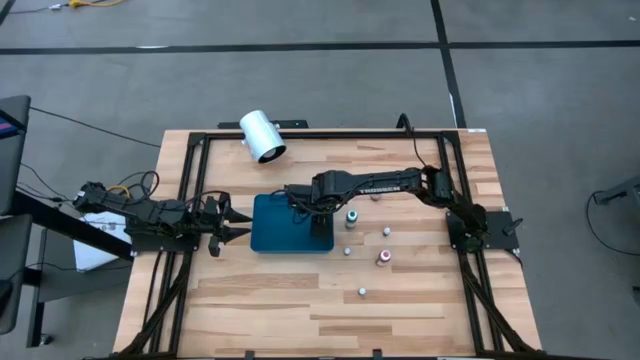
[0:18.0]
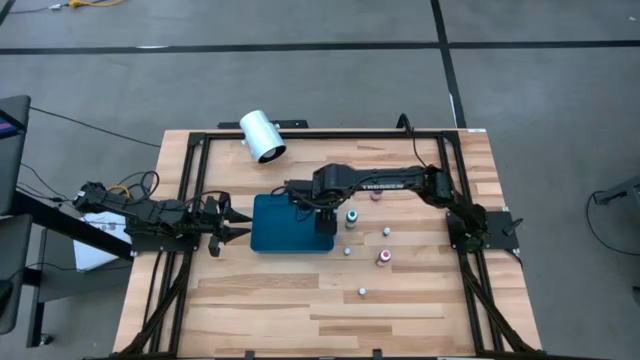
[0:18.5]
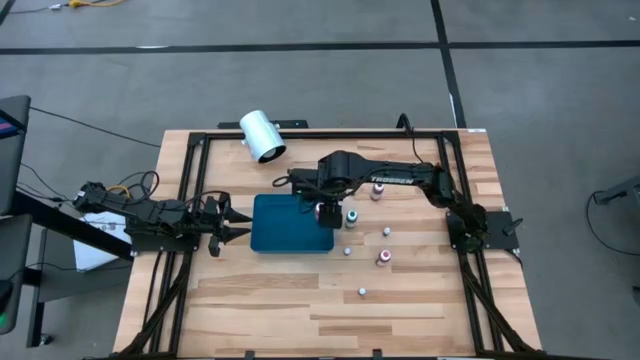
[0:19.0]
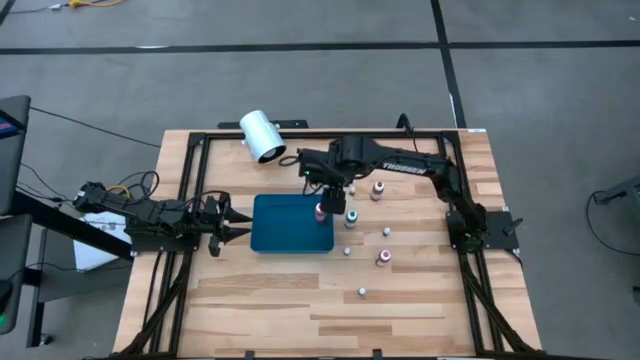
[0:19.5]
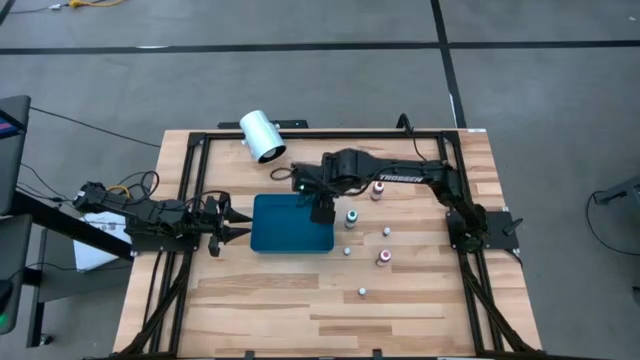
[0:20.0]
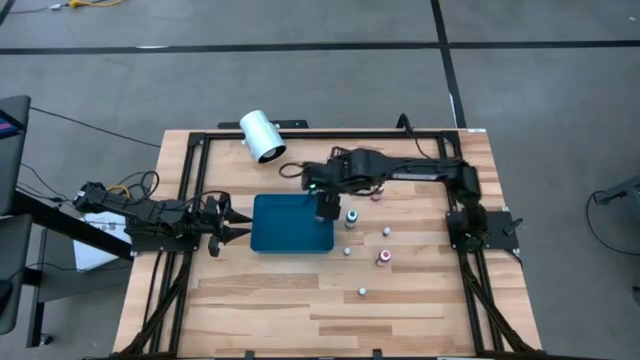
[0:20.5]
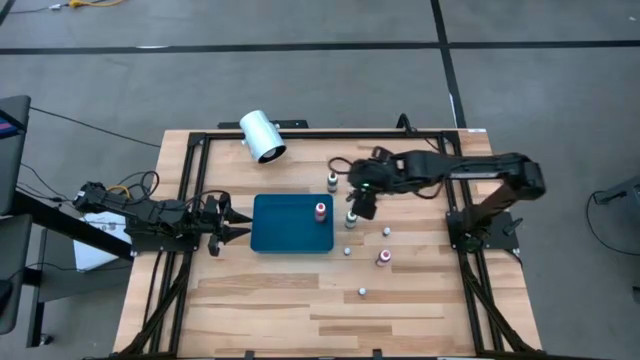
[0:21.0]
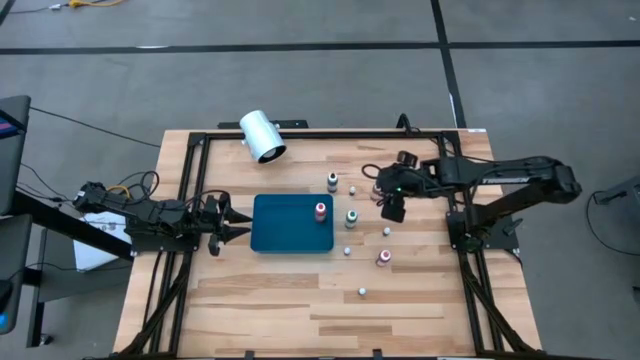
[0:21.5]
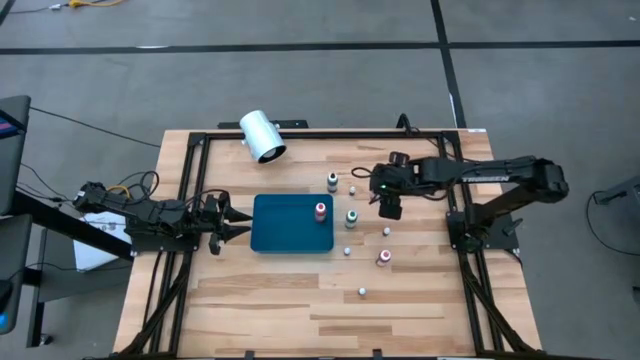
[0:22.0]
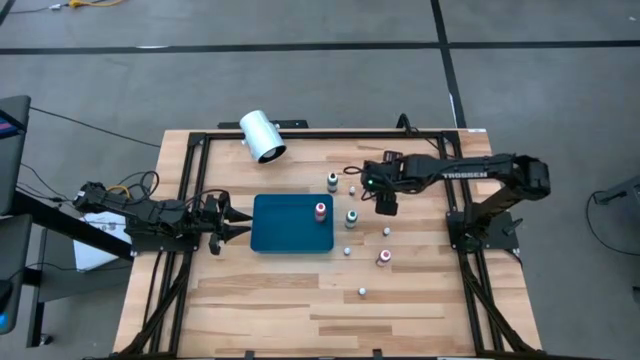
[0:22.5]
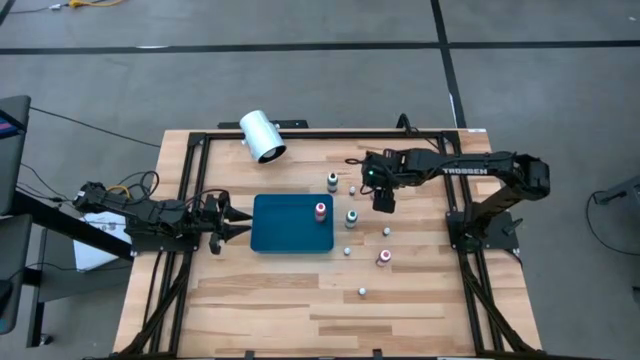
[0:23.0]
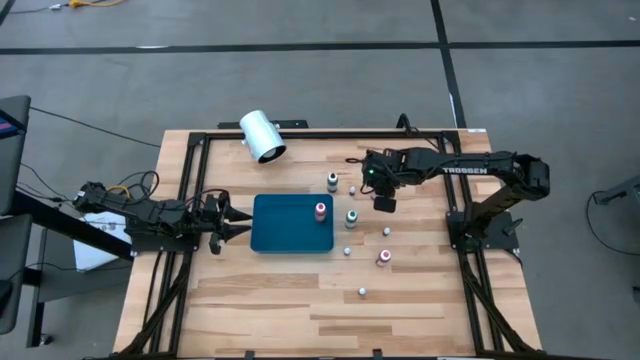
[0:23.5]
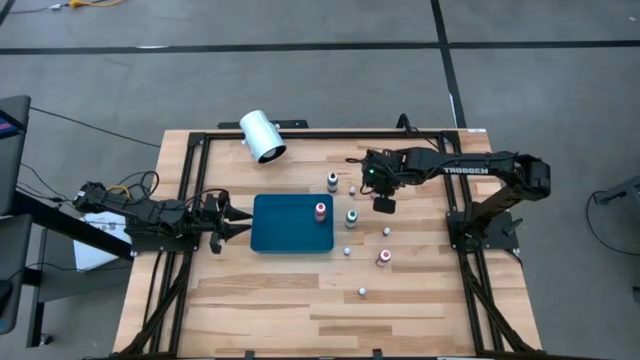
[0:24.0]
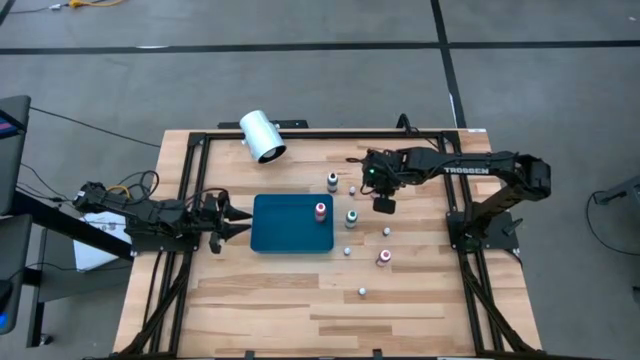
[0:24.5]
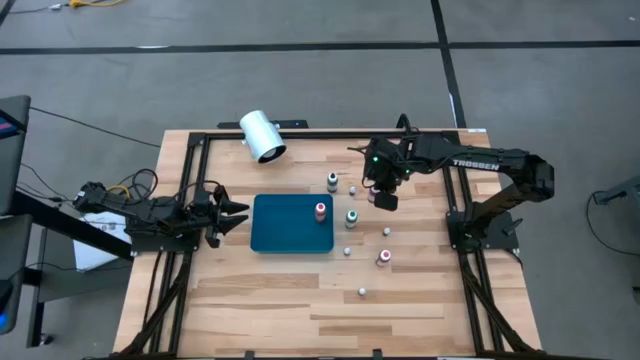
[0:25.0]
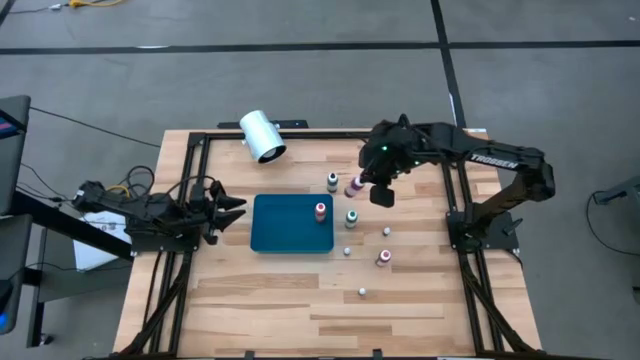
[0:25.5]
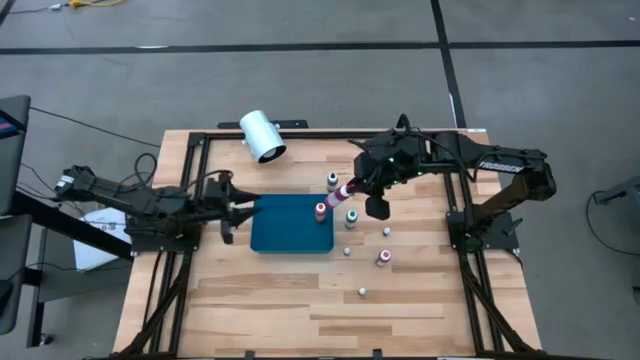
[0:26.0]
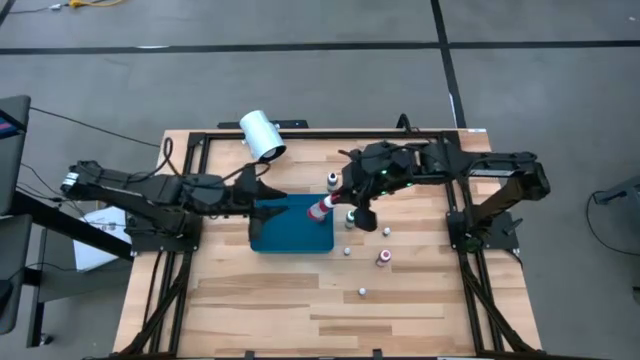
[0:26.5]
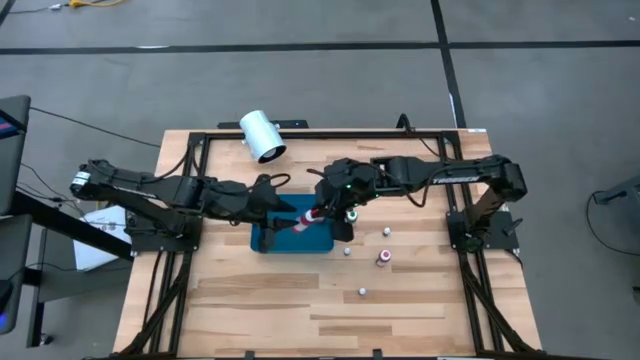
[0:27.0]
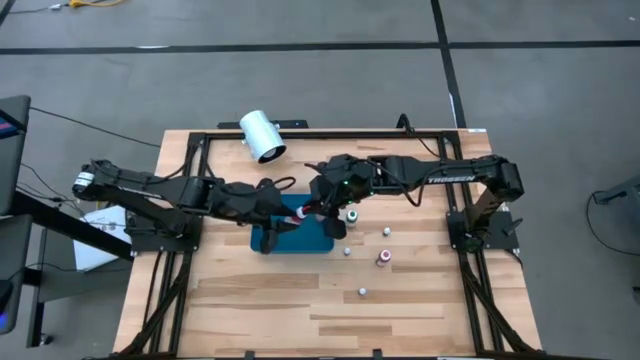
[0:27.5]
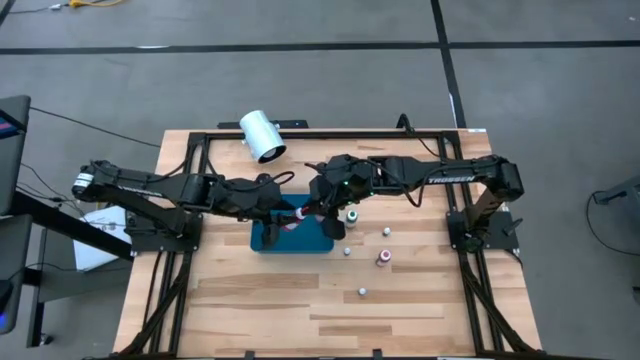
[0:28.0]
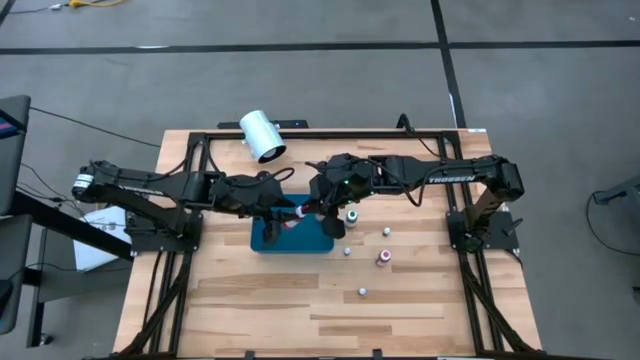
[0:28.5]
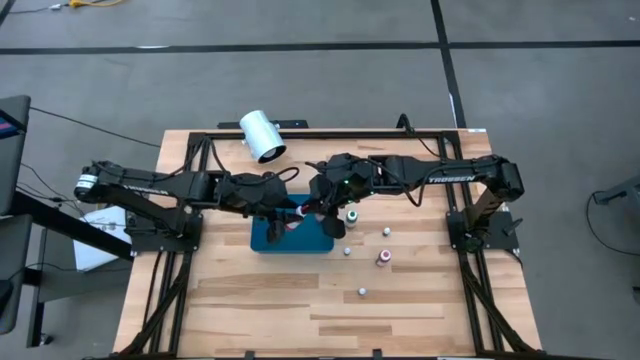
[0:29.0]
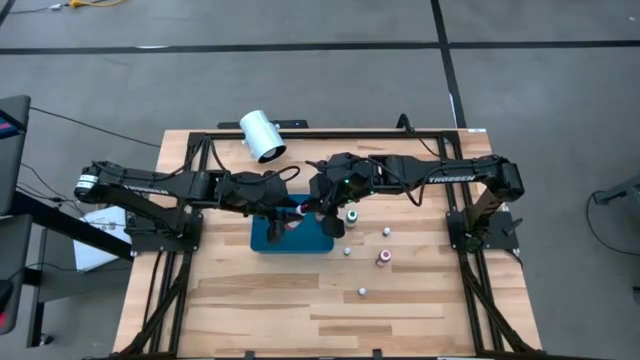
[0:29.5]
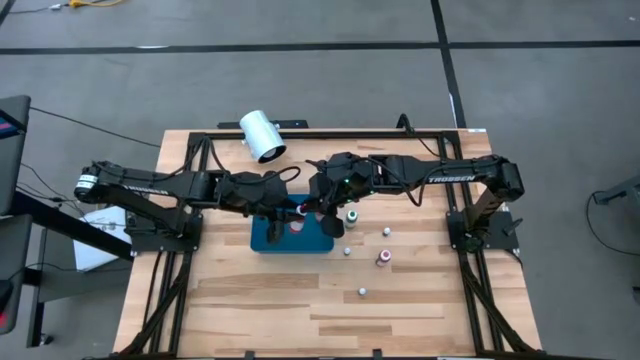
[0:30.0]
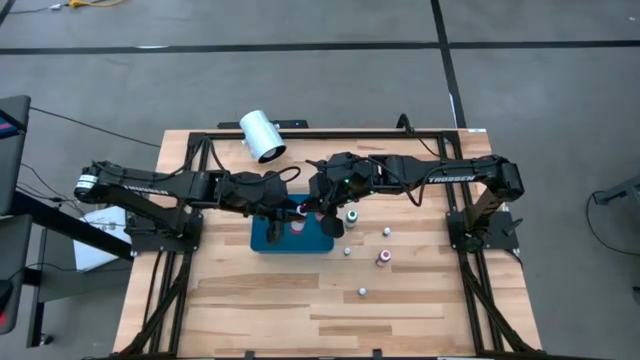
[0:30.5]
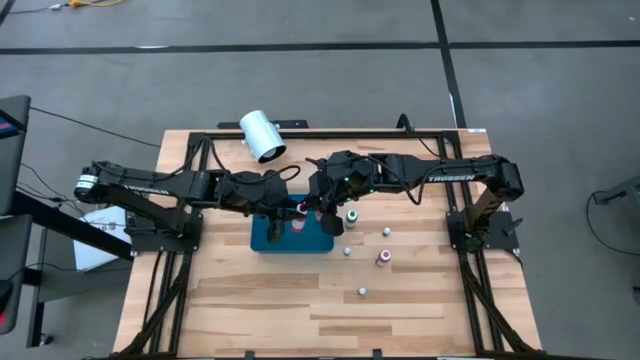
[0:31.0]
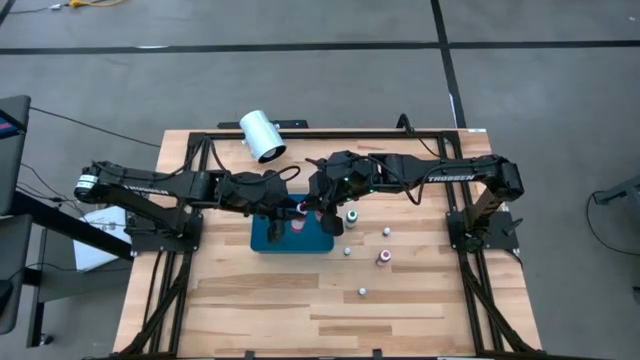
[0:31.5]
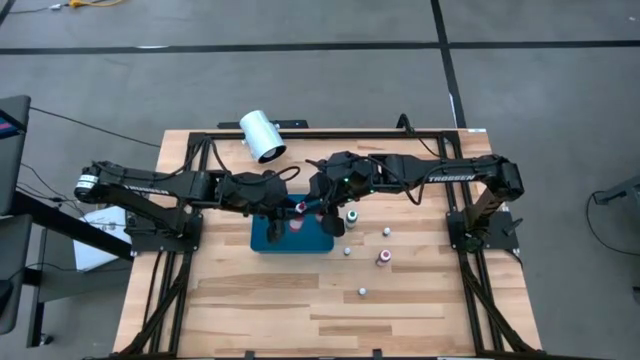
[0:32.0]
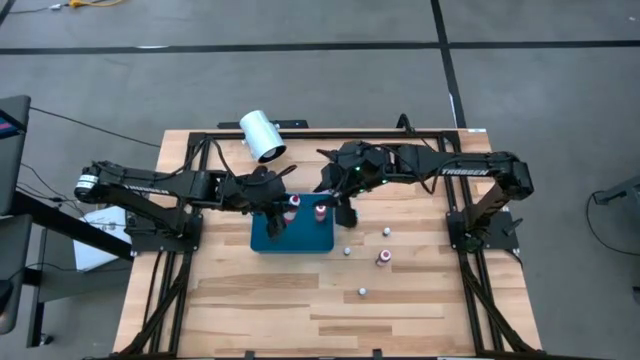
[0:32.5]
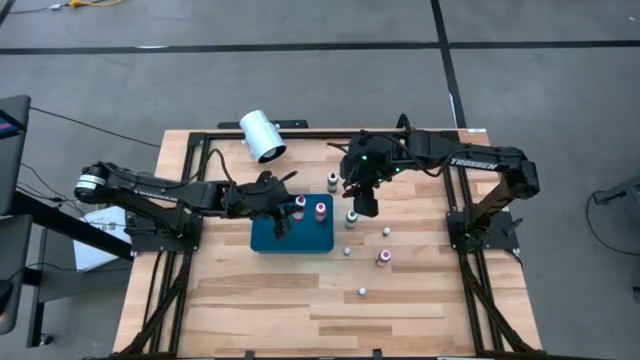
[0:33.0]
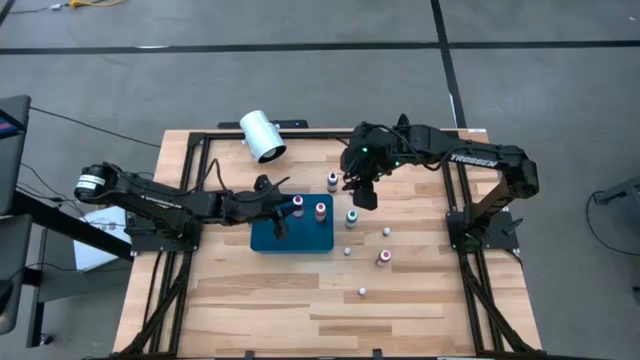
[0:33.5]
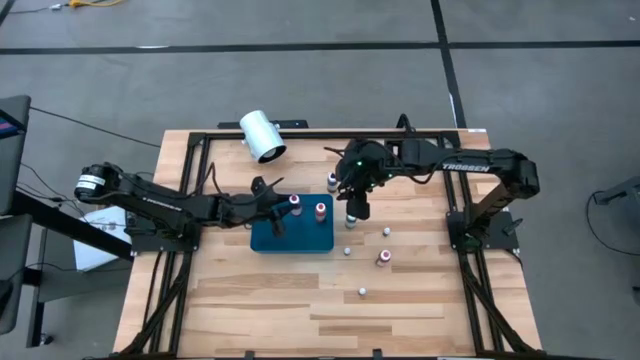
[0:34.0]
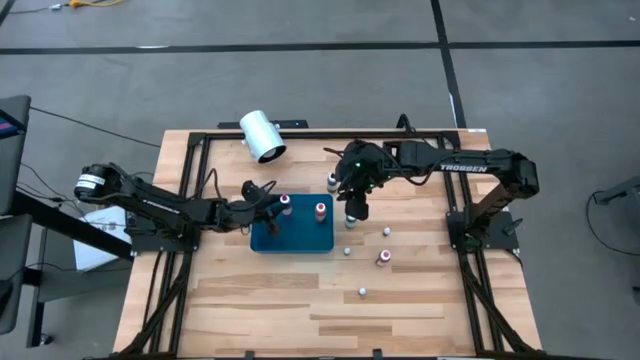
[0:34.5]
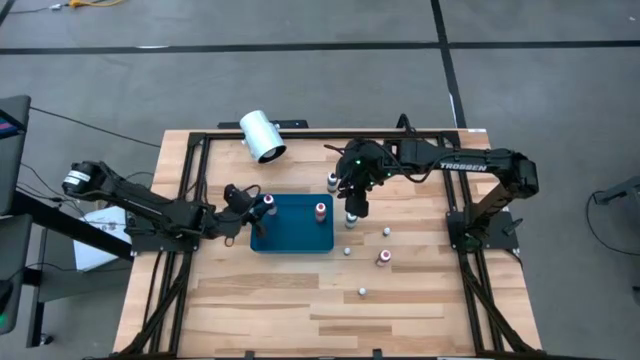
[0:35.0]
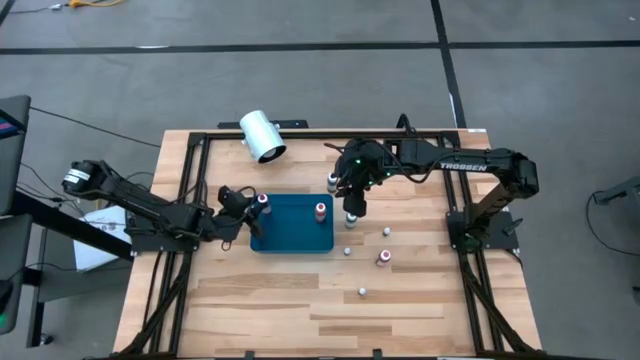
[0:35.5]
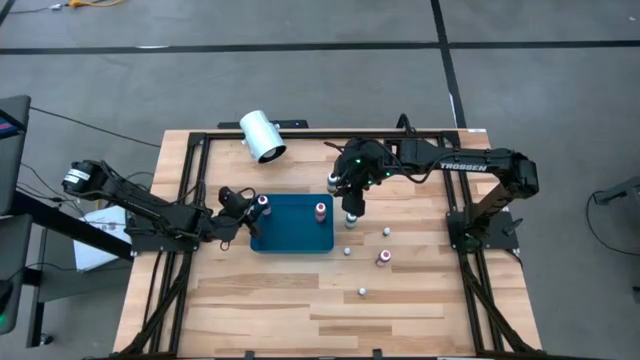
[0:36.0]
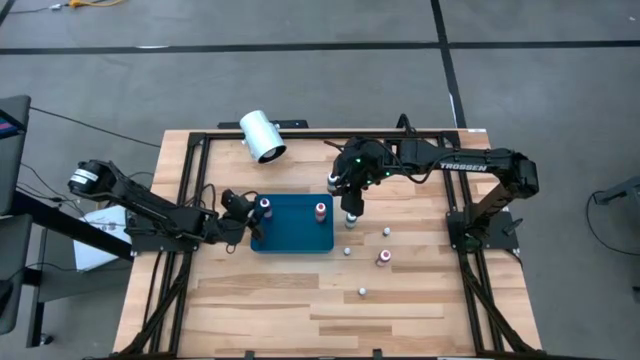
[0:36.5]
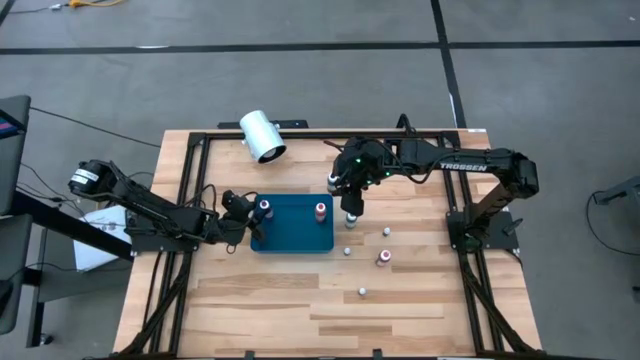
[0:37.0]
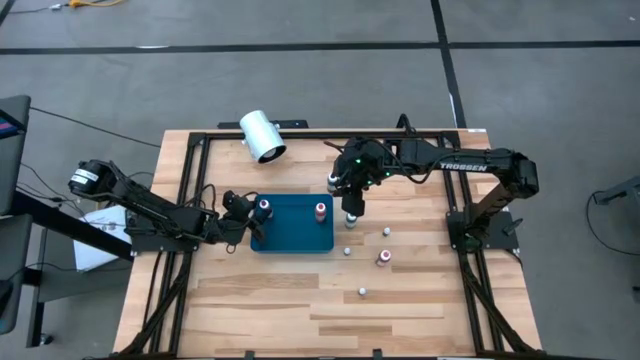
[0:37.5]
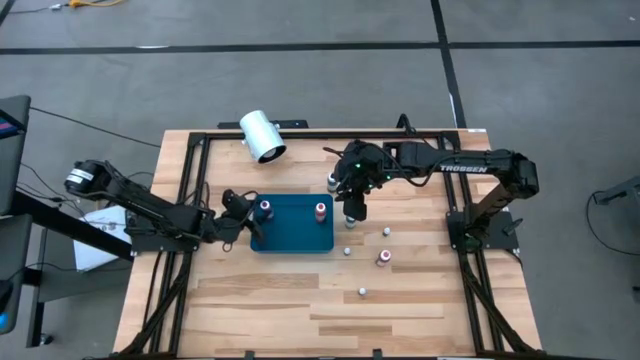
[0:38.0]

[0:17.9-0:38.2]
Task: Pick & Place food coloring
Put the large red food coloring bottle into the bin
